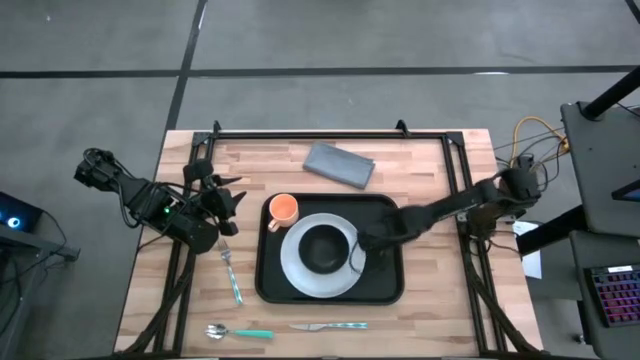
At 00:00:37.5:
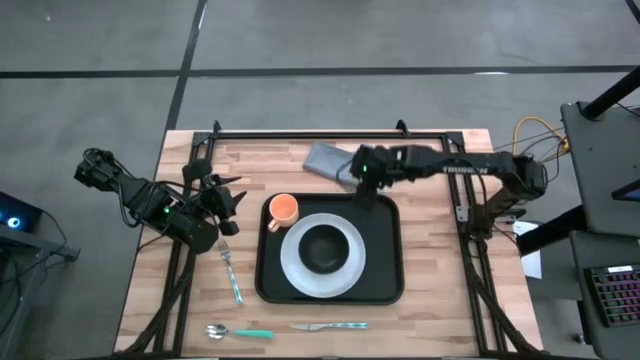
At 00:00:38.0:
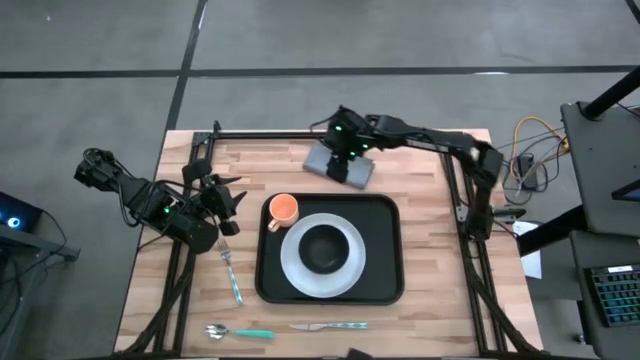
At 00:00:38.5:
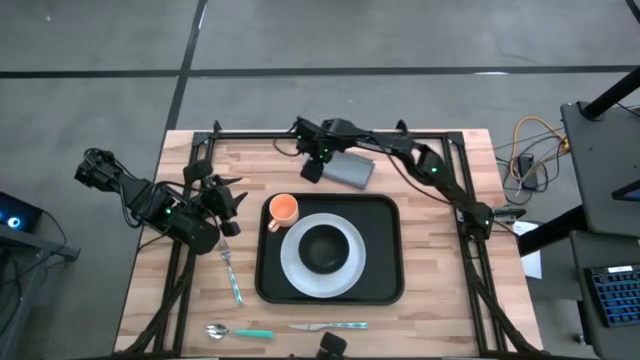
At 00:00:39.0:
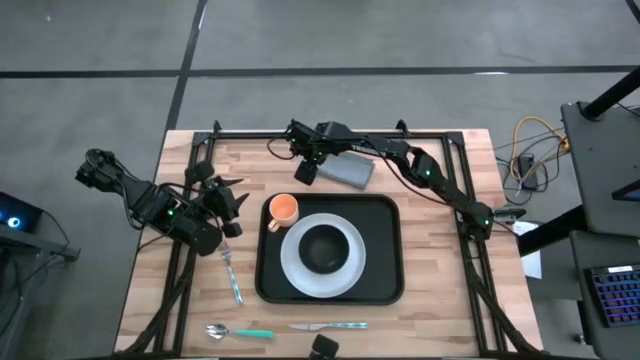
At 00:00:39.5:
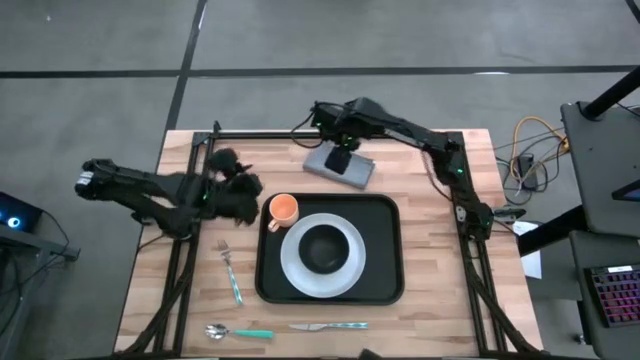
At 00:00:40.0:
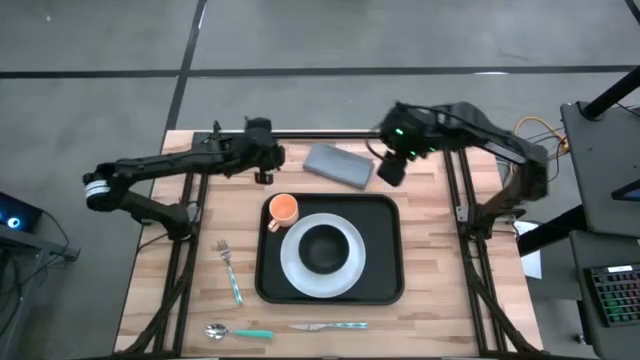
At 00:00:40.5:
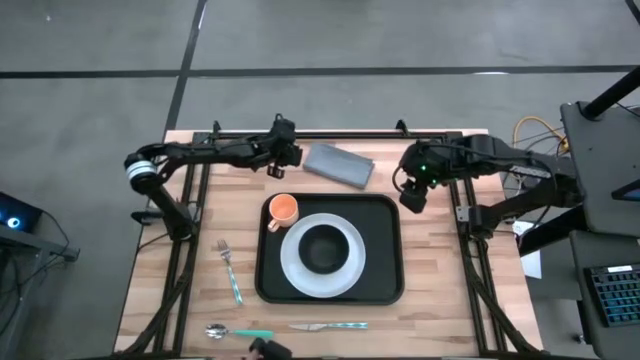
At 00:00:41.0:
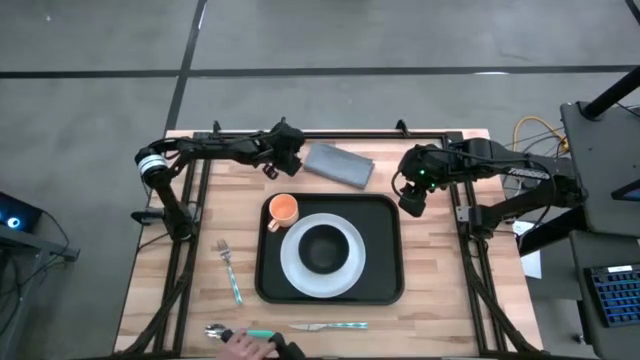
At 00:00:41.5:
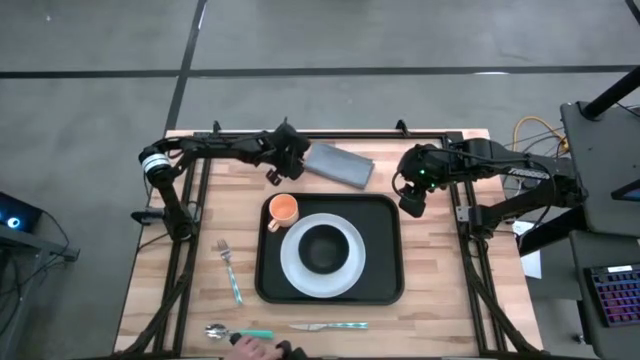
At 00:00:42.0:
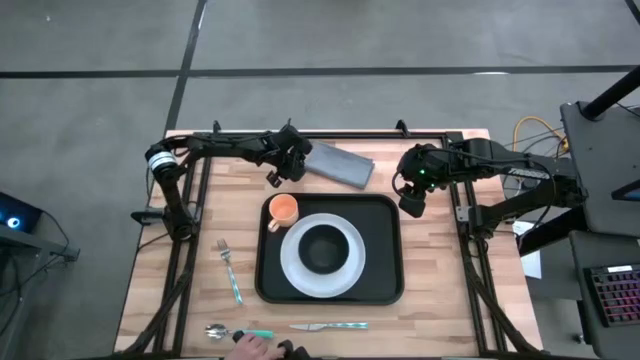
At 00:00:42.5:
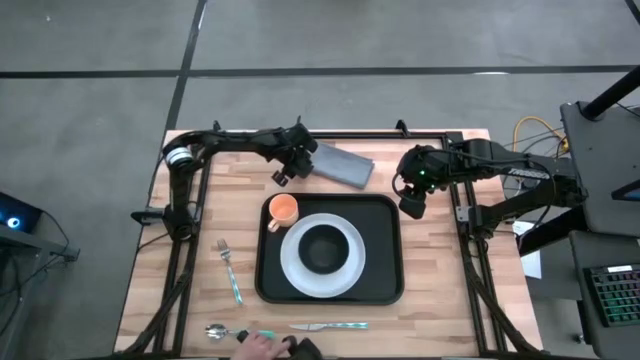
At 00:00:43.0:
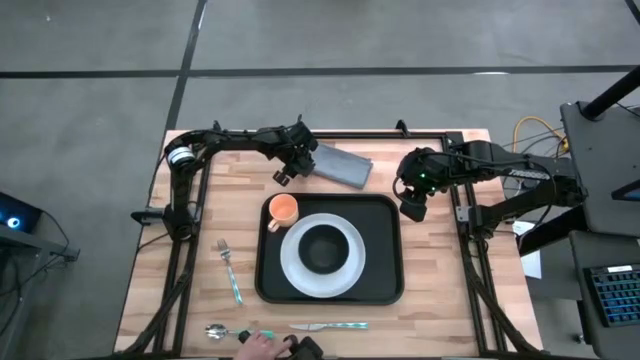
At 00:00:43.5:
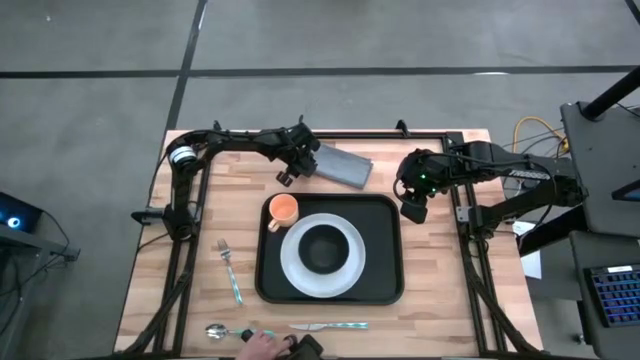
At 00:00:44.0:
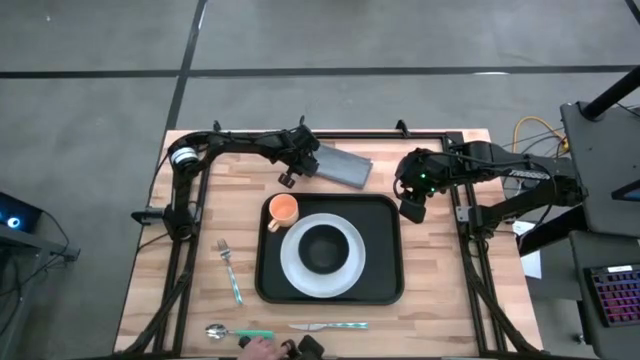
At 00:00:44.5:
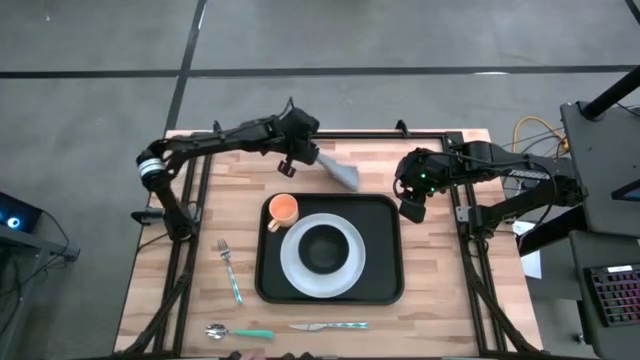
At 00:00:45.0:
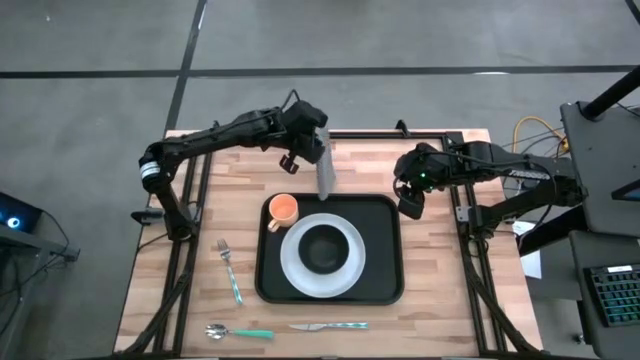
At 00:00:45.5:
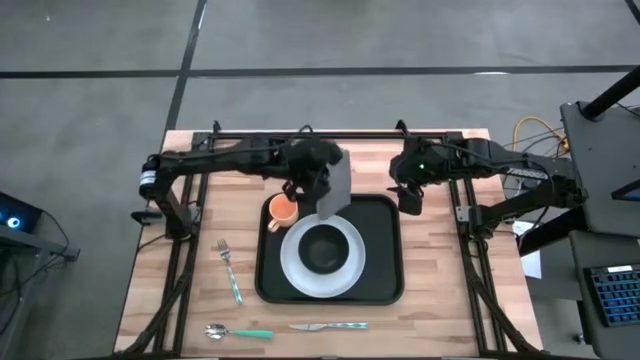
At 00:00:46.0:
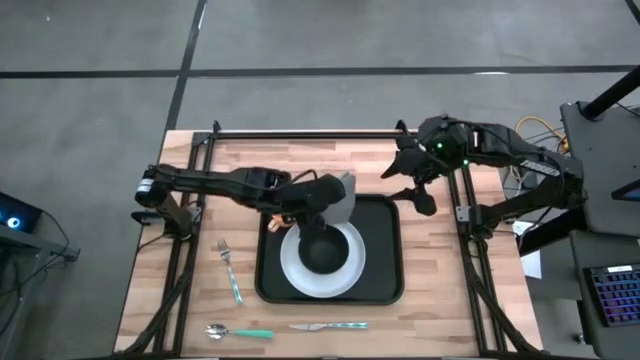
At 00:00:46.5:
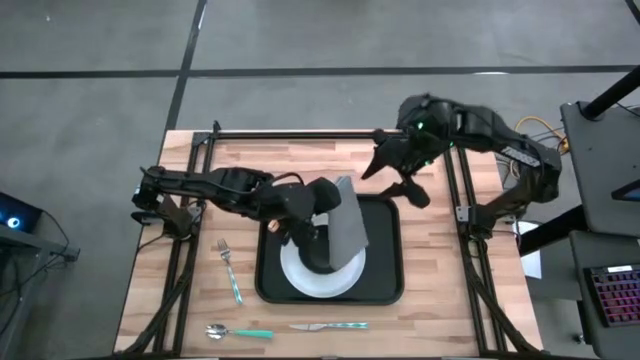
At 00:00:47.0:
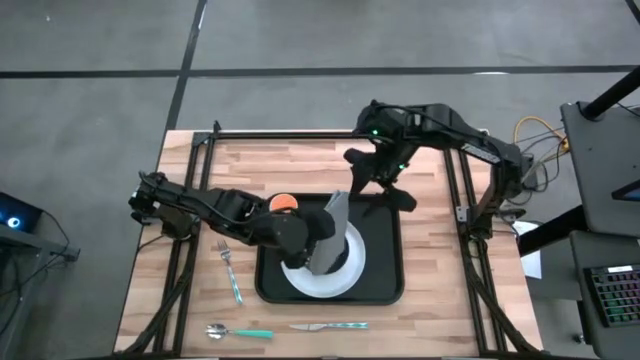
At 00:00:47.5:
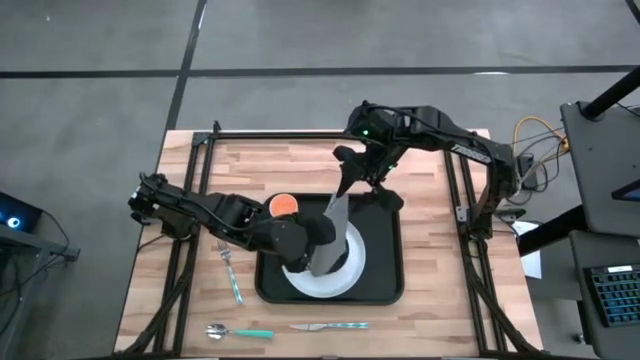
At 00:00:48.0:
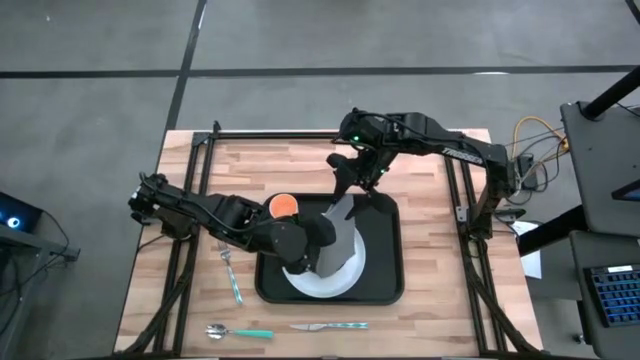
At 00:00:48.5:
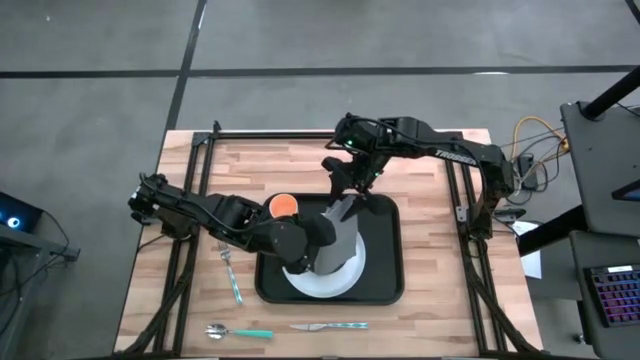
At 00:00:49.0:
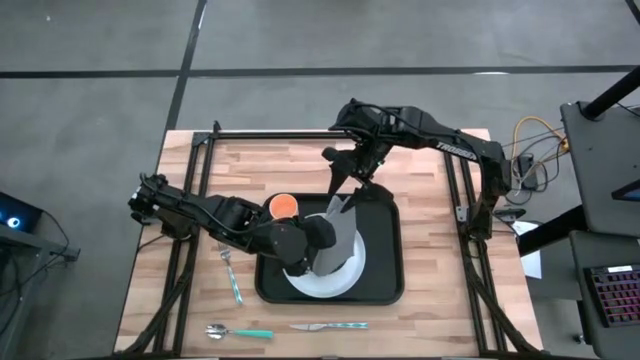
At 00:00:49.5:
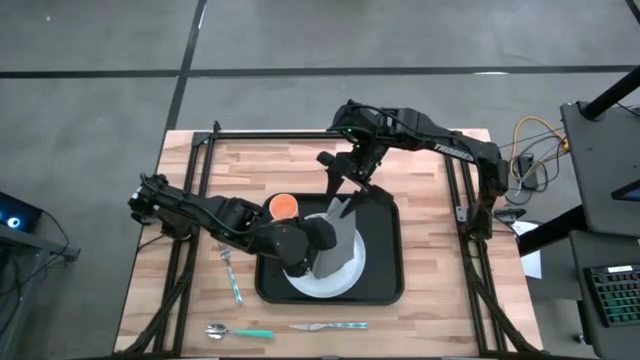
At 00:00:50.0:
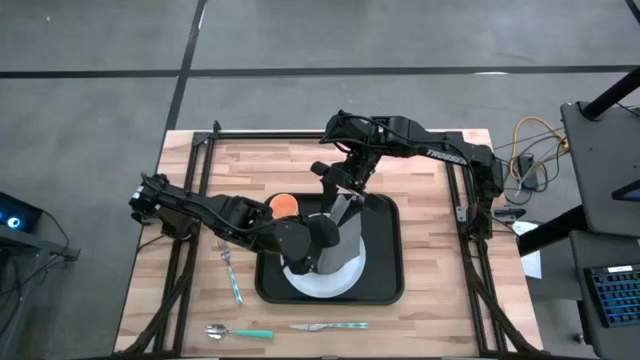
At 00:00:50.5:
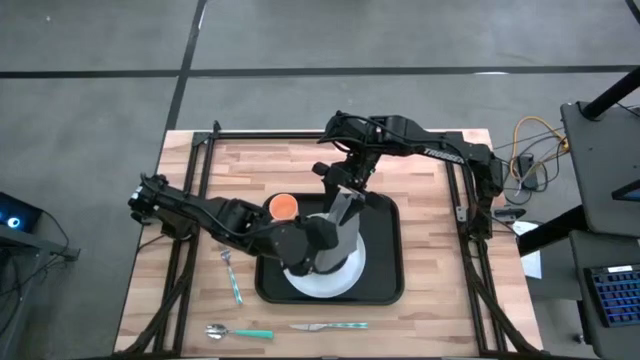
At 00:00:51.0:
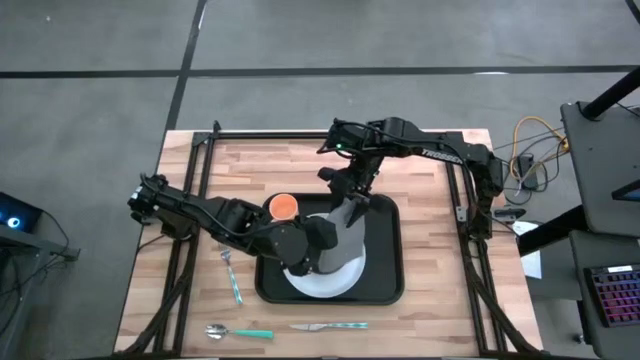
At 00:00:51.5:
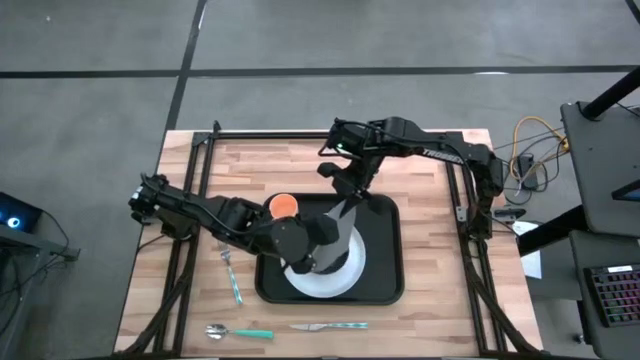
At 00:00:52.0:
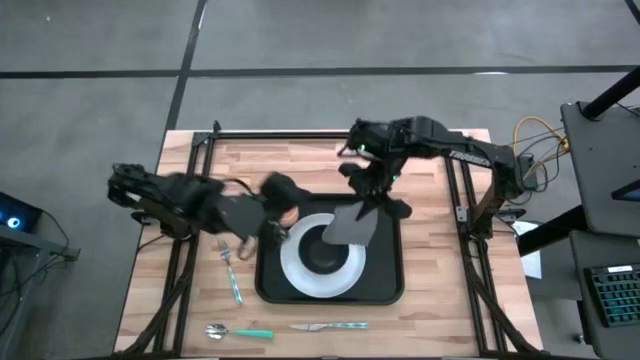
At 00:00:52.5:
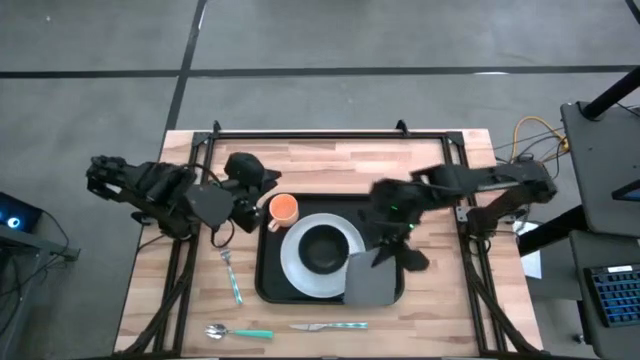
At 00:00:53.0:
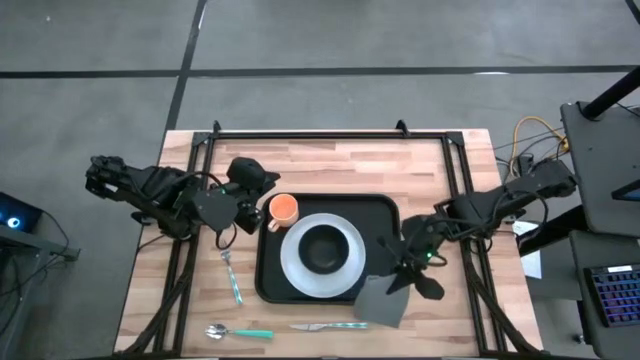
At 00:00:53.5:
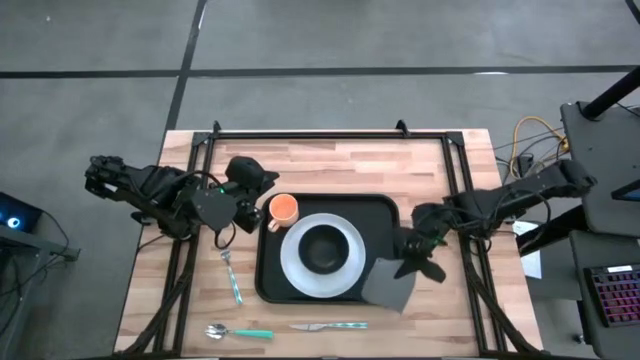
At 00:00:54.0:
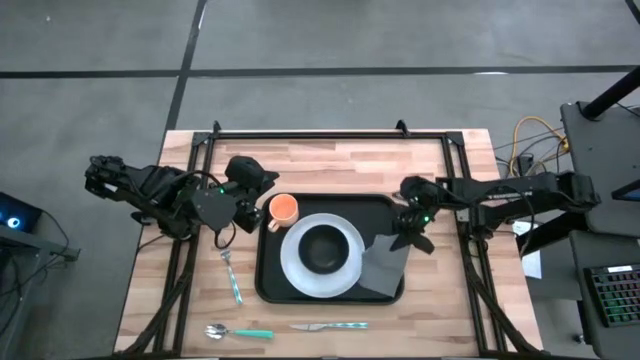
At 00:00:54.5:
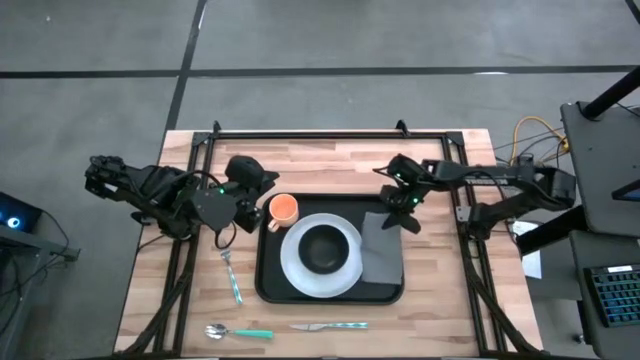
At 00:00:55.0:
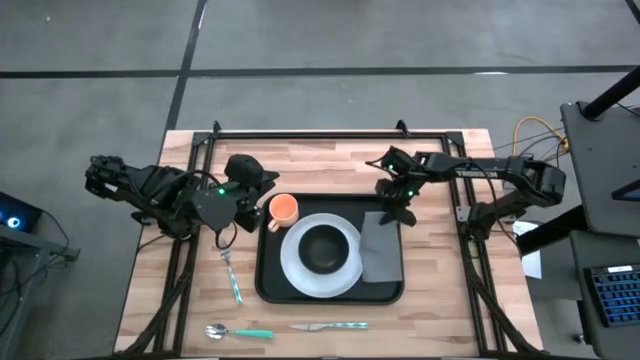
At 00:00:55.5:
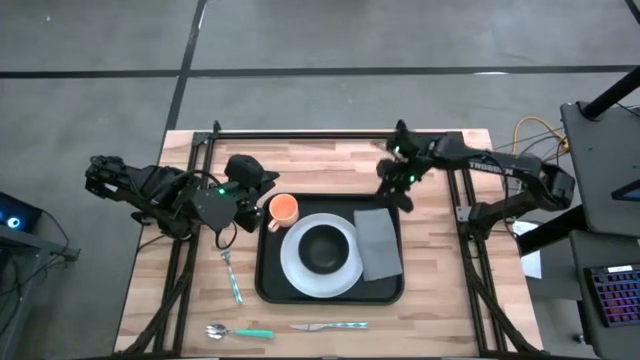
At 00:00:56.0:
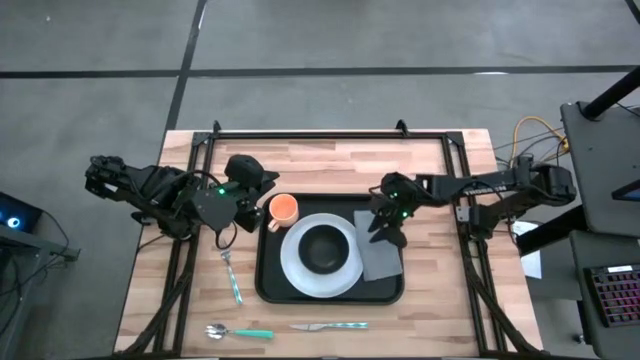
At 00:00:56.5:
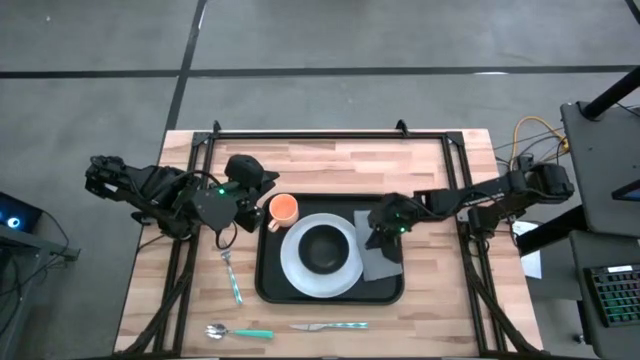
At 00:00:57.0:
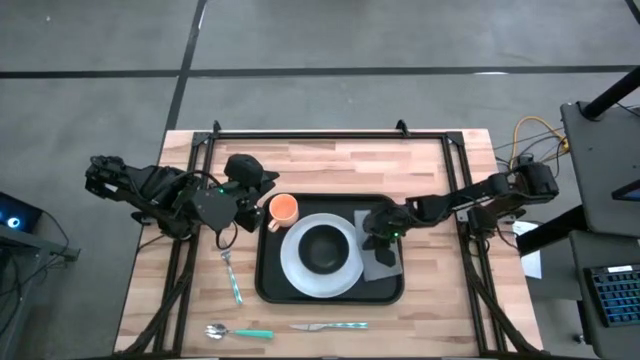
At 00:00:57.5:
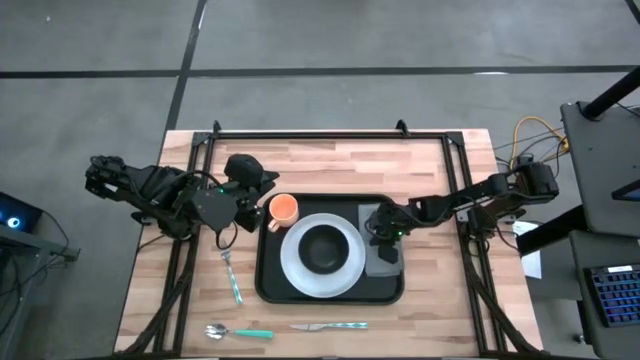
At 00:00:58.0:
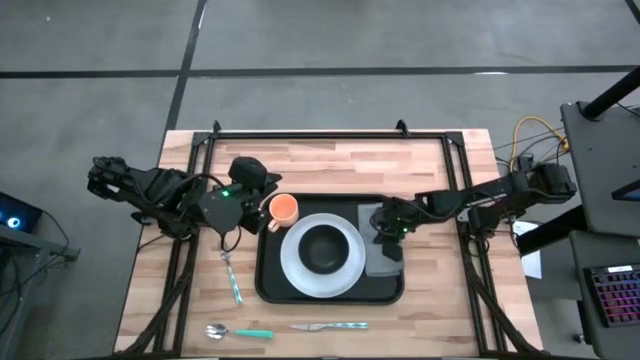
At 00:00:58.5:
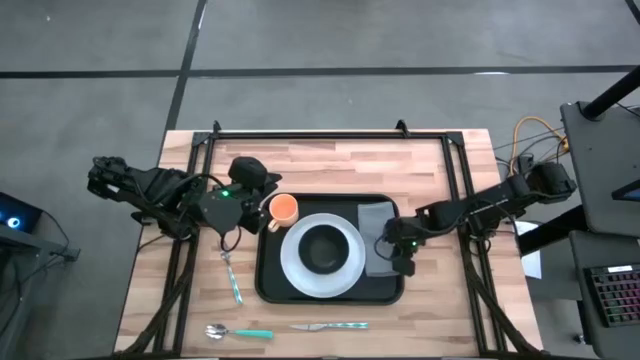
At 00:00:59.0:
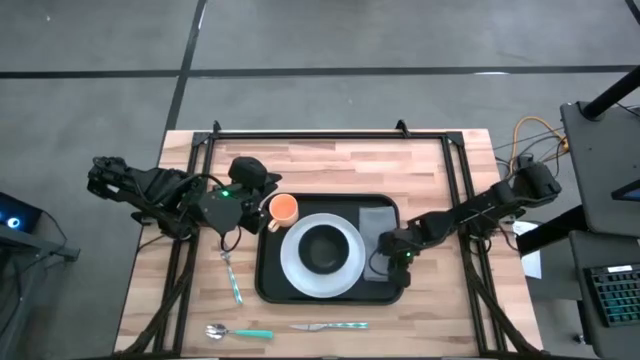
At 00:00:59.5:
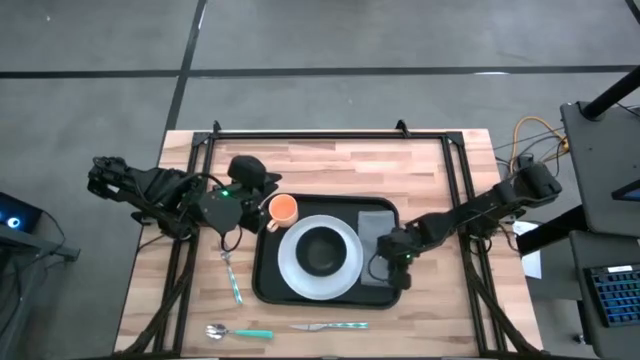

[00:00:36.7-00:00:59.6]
Task: Set up tray
Put the gray napkin on the black serving tray to the right of the white plate
